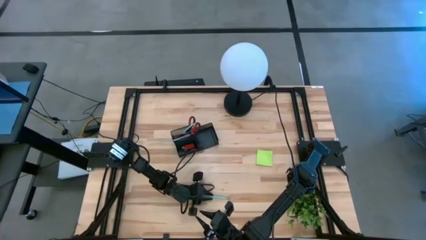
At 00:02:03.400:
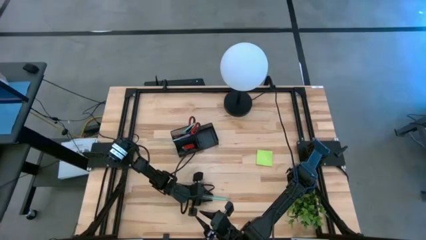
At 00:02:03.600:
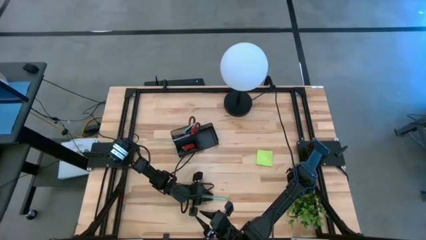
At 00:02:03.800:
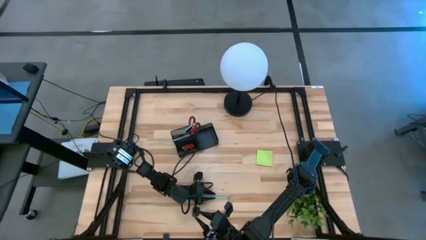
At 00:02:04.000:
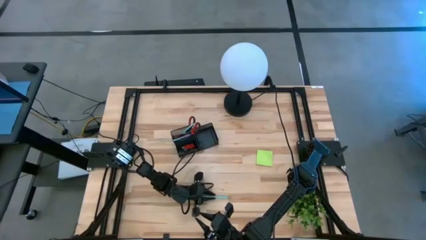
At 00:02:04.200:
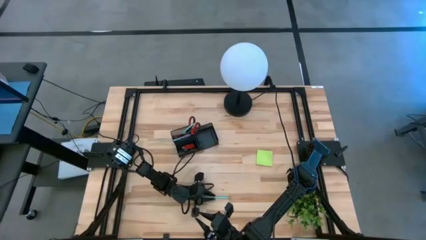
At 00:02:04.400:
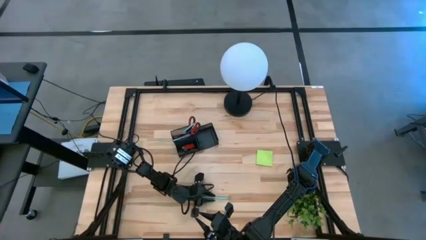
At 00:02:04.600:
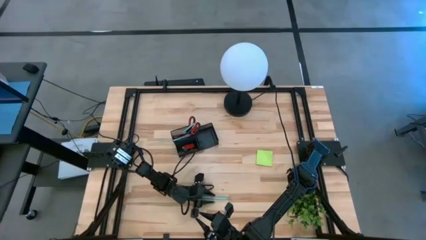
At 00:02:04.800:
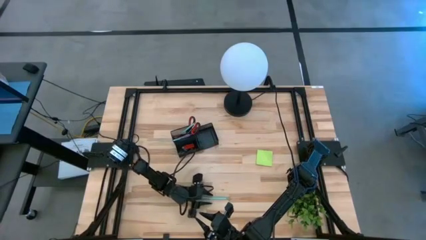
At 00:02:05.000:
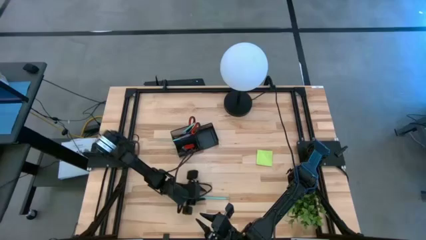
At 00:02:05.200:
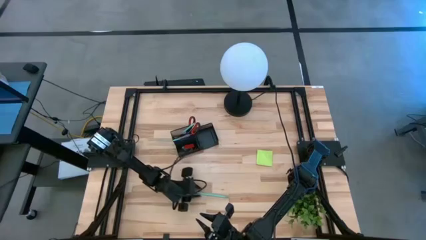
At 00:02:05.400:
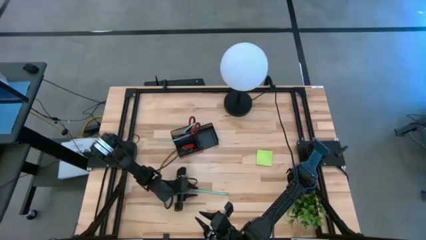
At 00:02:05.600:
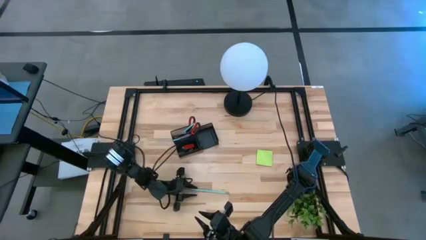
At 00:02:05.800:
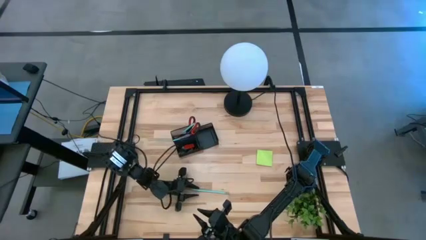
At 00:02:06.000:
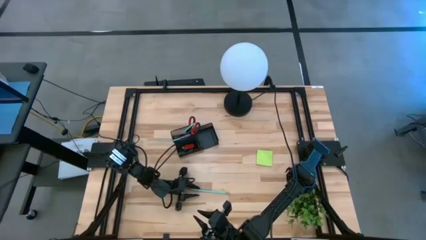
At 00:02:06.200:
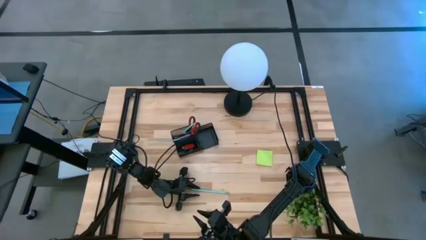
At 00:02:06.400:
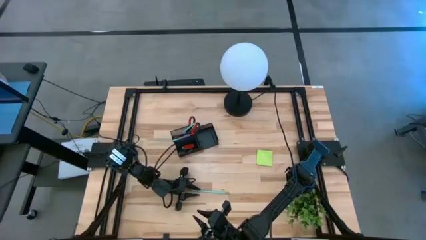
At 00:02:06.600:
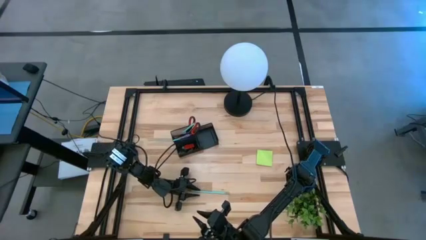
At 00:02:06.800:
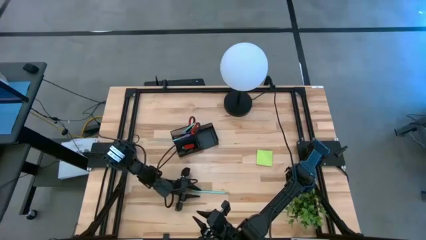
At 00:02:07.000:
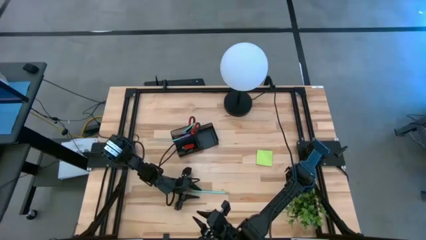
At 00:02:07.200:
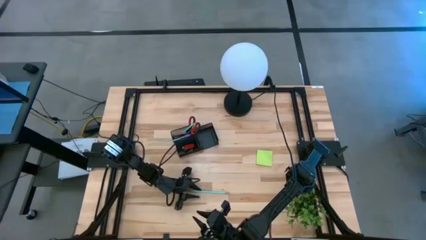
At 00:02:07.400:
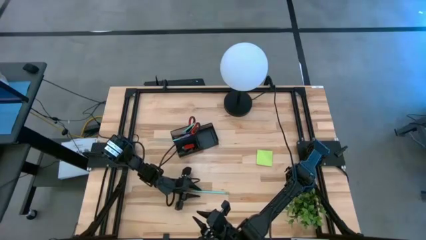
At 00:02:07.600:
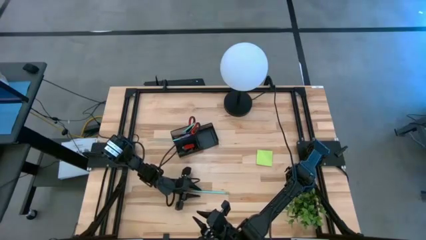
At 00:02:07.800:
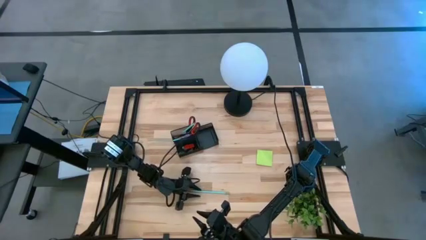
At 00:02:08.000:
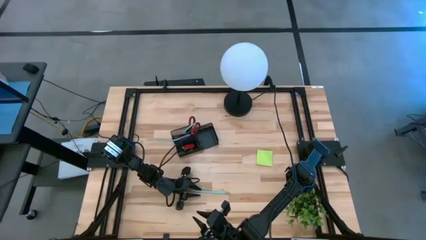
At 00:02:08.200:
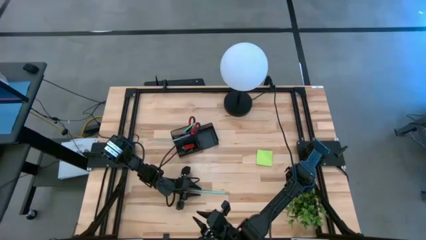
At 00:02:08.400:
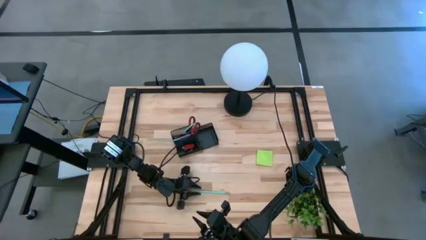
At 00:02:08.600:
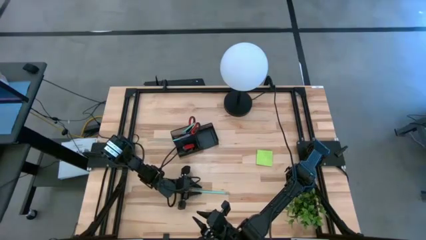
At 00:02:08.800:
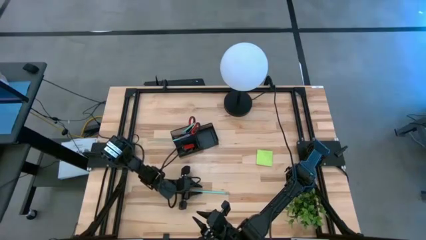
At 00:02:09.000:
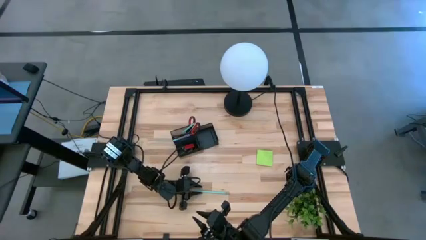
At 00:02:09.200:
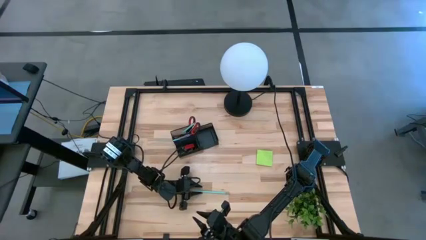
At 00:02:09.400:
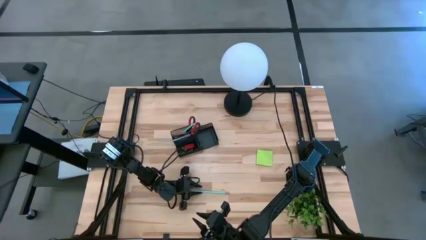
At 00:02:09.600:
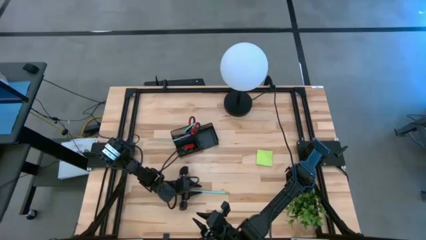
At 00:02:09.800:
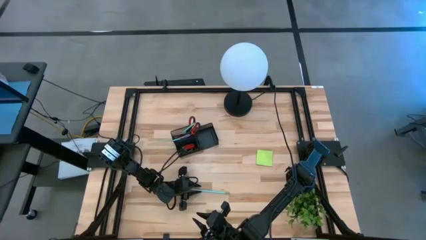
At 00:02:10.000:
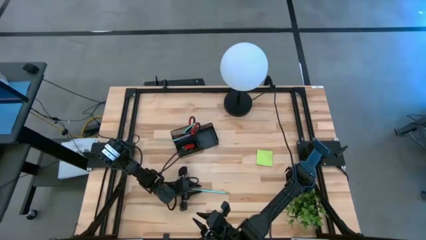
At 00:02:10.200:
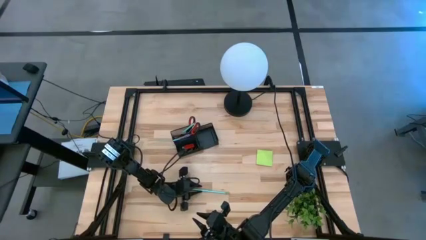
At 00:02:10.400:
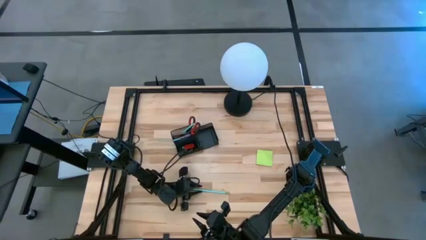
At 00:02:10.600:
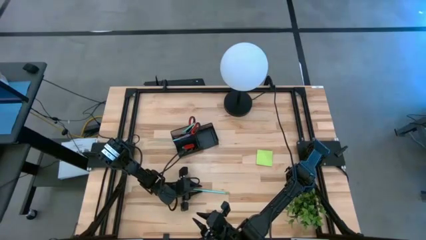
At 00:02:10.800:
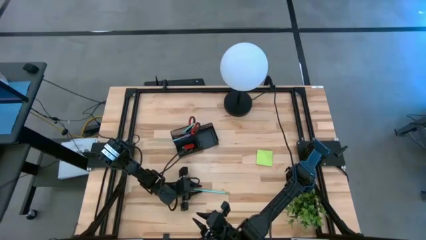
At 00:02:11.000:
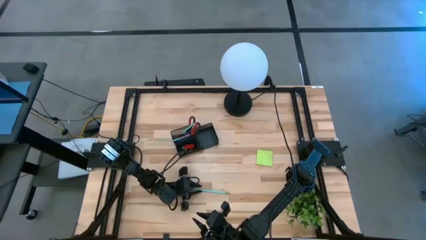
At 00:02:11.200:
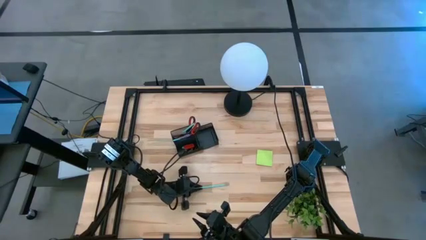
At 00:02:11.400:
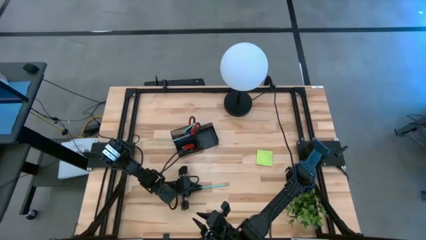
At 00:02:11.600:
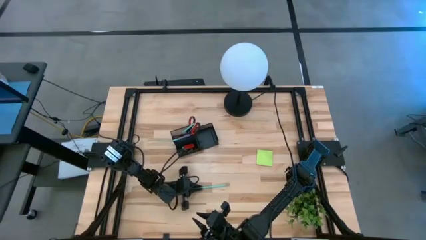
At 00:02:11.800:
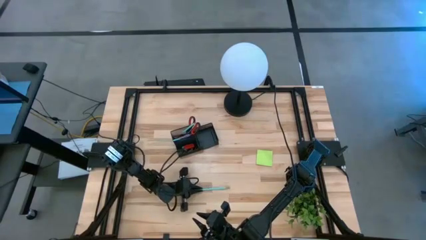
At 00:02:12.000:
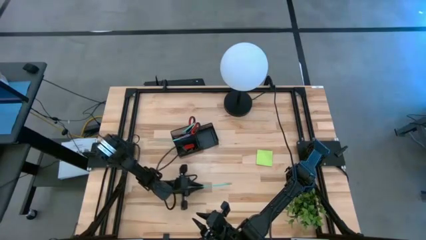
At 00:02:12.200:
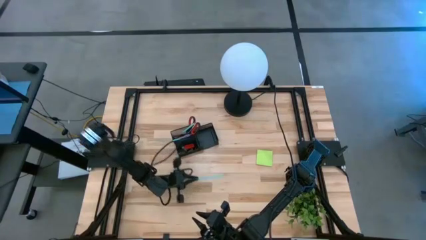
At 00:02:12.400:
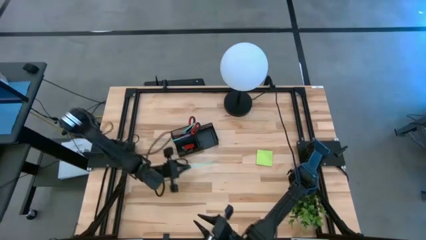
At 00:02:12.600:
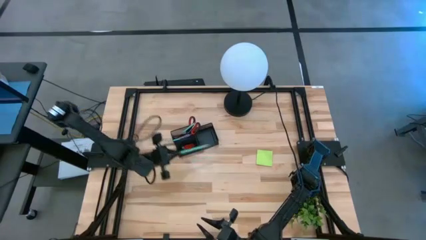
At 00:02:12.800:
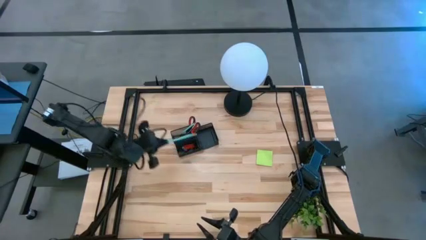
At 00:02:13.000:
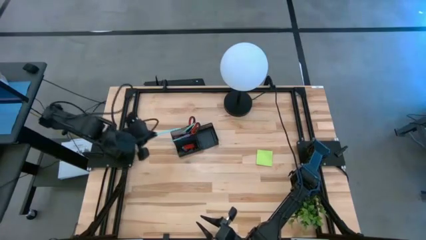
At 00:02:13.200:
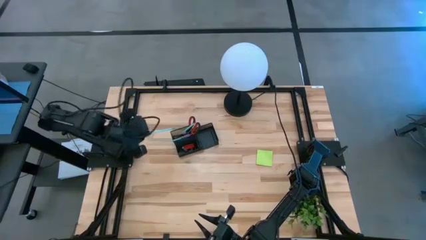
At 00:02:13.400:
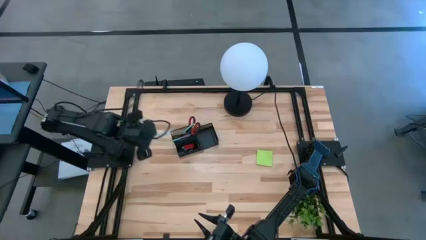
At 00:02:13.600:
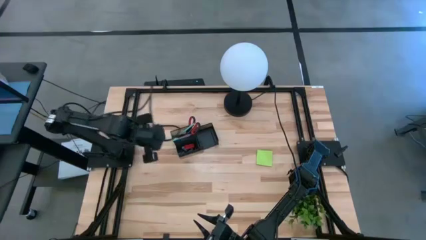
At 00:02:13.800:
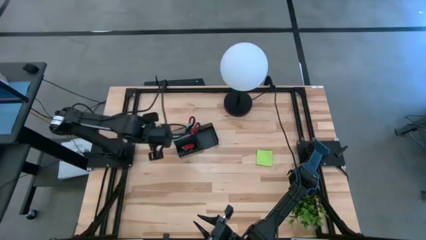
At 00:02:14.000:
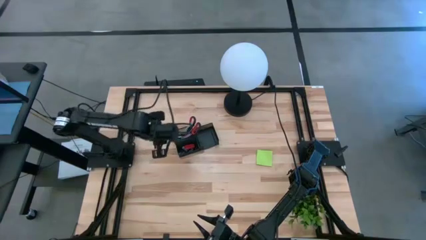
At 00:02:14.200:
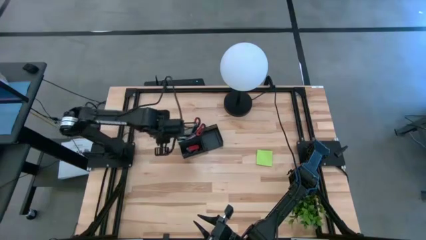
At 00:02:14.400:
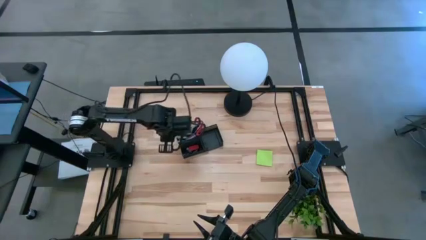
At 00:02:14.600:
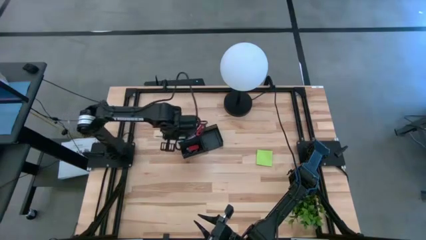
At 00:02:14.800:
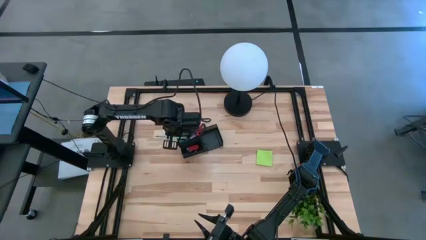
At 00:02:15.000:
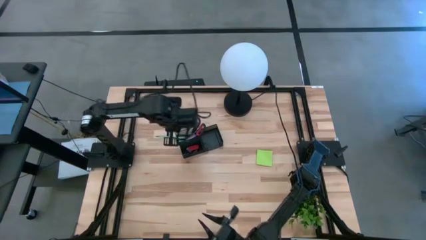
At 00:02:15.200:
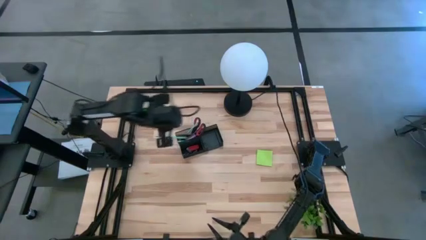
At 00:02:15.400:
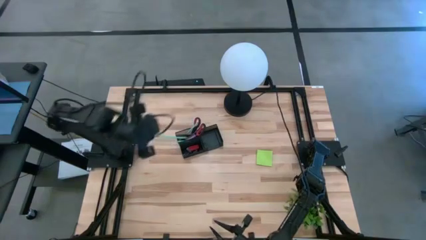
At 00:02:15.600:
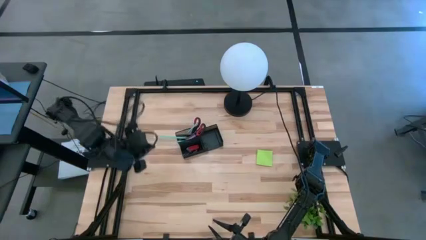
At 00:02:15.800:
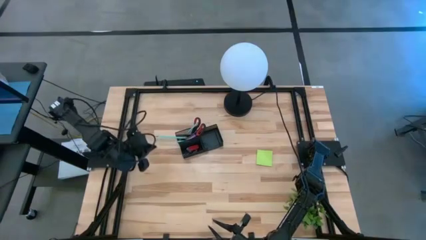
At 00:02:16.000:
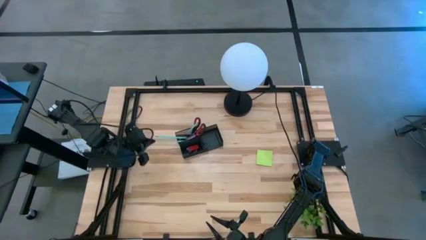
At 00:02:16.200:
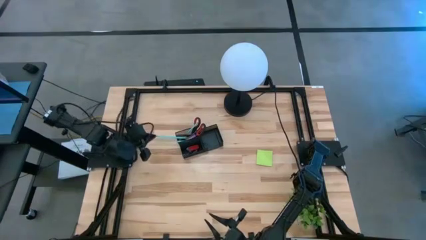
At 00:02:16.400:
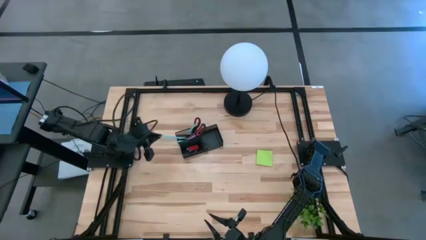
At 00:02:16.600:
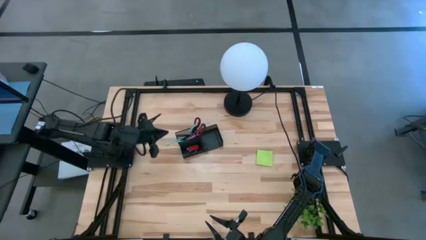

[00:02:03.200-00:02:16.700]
Task: Pick and place office supplies into organizer
Put the blue pencil into the black desk organizer

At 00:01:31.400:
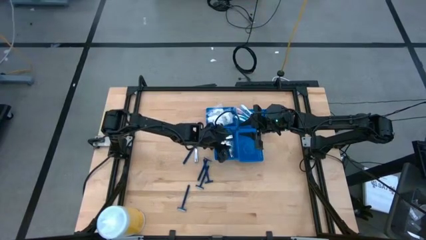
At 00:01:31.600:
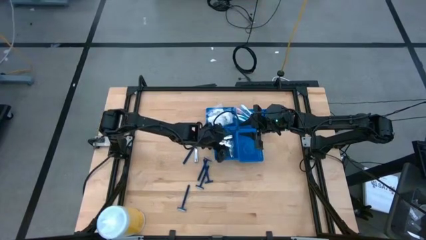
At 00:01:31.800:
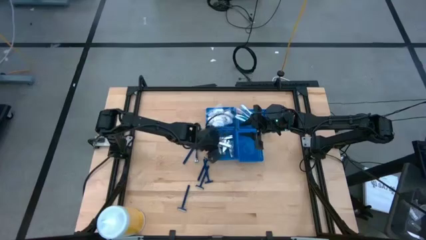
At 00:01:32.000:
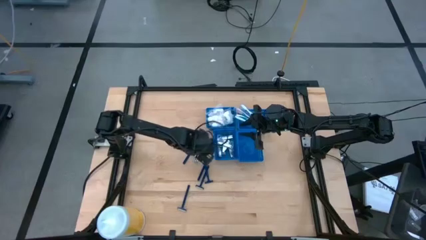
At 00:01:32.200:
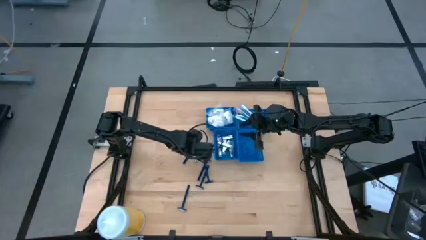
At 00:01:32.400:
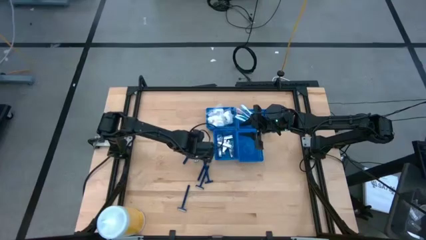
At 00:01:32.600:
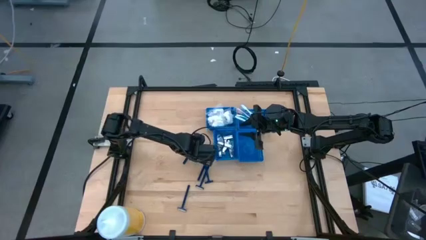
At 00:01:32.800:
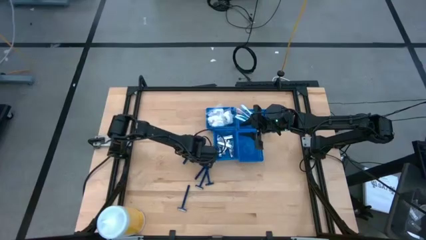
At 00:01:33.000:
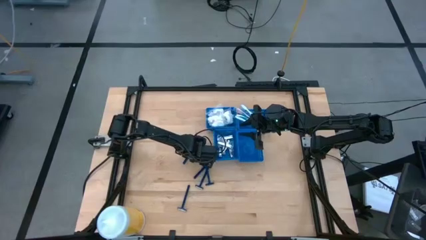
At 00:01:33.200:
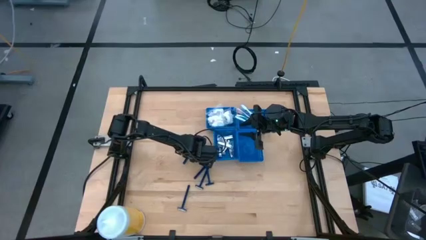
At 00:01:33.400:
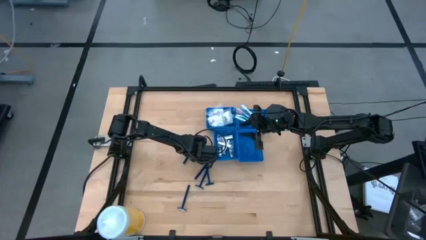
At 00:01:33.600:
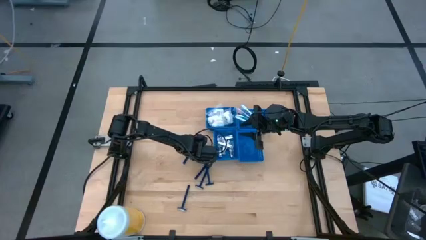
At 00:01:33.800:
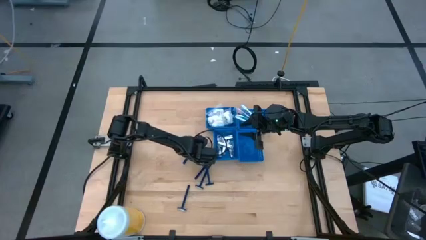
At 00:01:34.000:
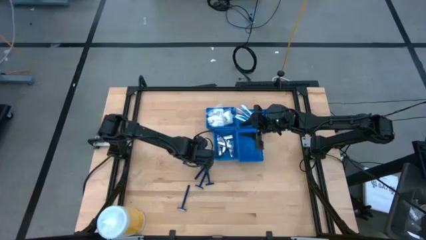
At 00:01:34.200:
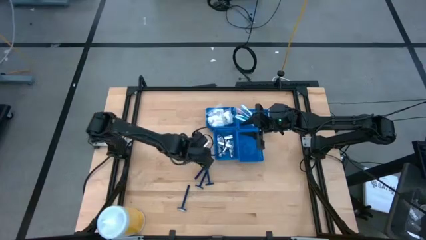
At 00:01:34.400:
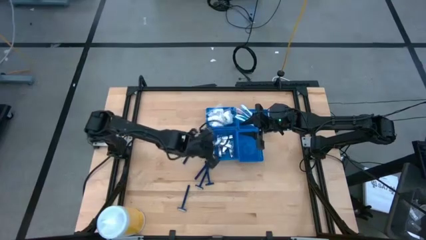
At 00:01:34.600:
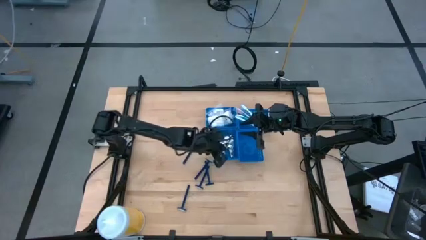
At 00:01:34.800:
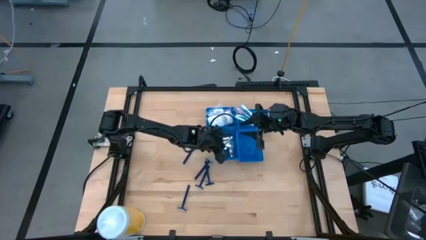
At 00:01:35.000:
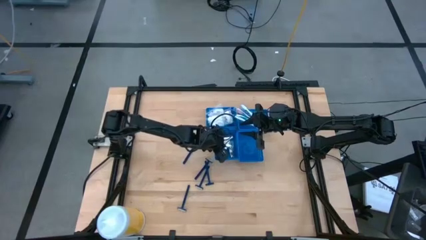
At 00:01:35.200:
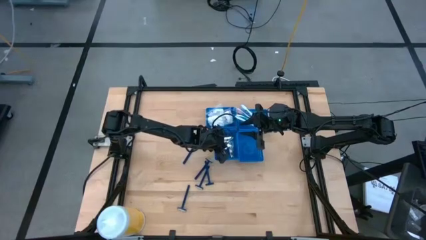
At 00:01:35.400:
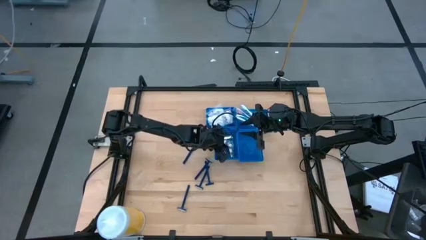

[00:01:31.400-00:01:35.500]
Task: Pick & Place Travel size toiletries
Put the silver nail cutter into the bottom left blue basket
